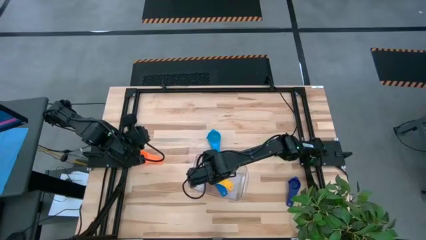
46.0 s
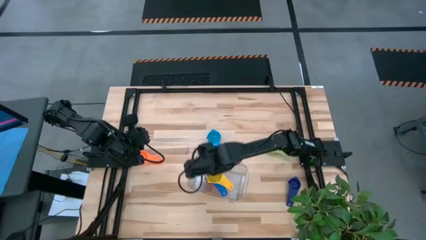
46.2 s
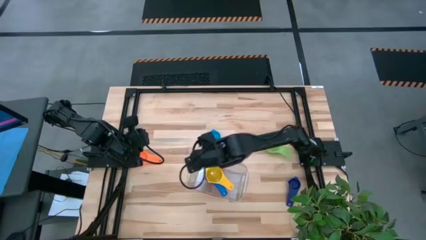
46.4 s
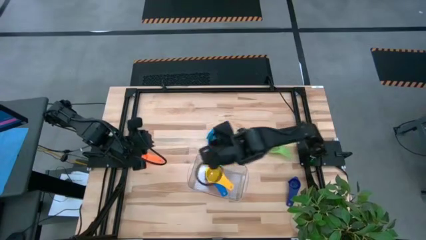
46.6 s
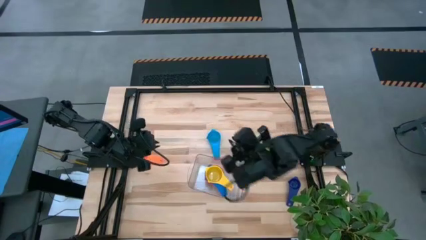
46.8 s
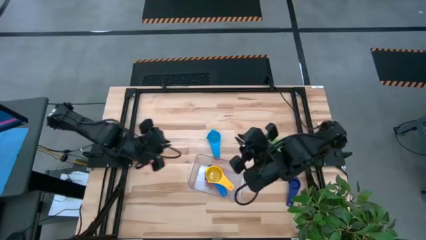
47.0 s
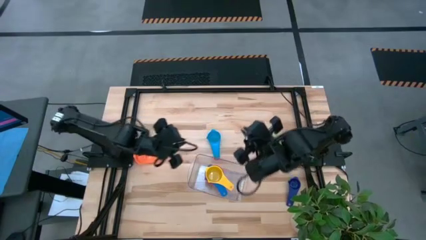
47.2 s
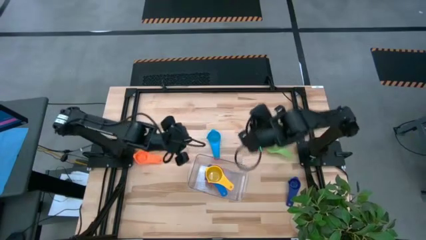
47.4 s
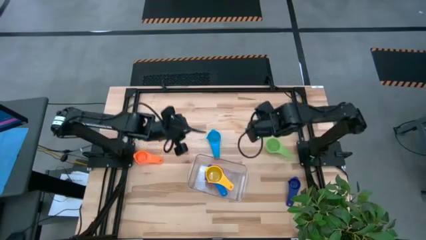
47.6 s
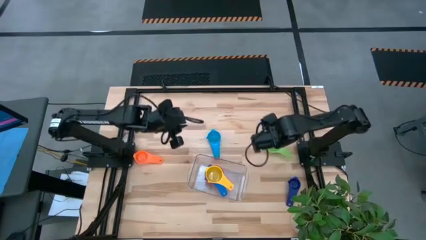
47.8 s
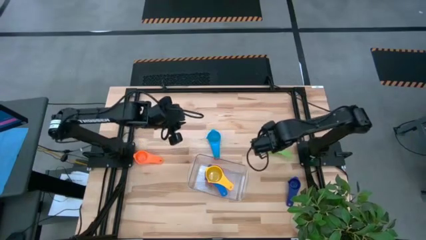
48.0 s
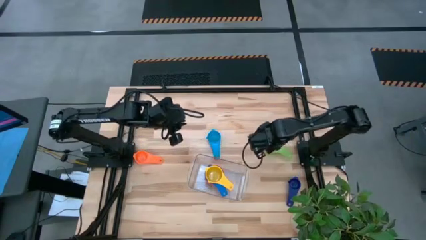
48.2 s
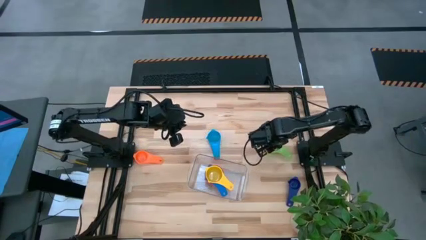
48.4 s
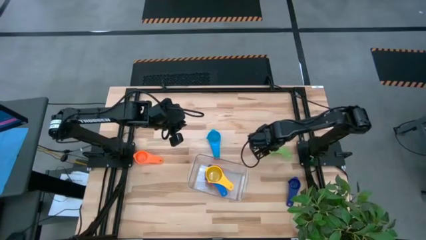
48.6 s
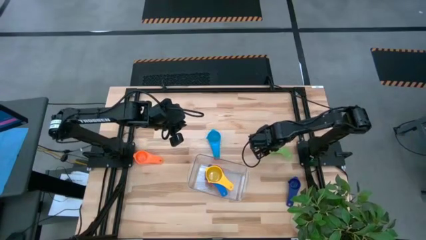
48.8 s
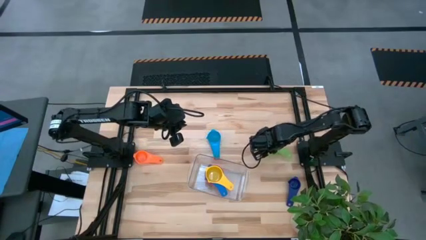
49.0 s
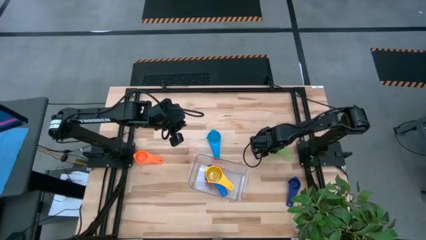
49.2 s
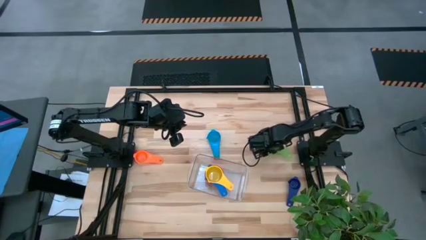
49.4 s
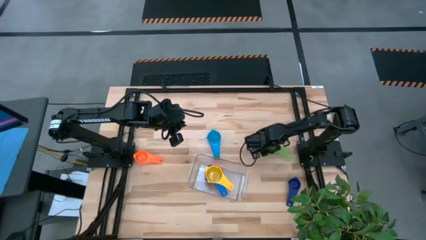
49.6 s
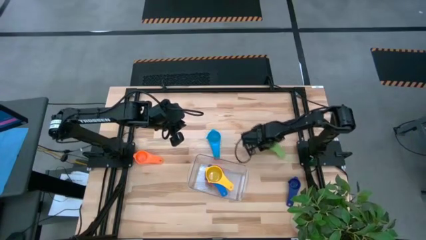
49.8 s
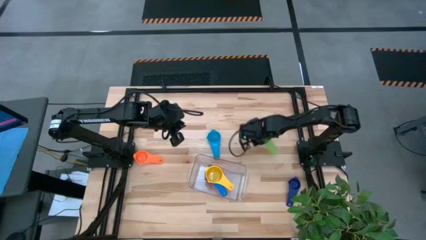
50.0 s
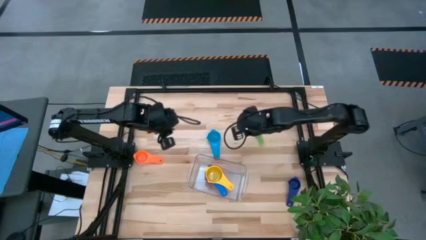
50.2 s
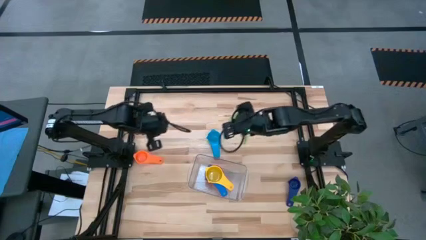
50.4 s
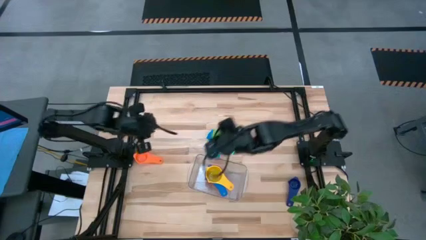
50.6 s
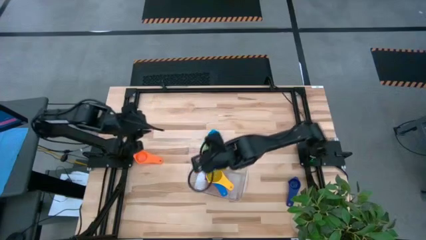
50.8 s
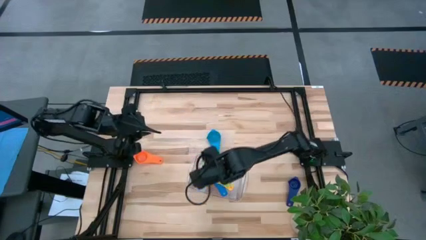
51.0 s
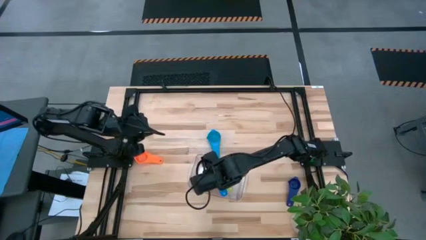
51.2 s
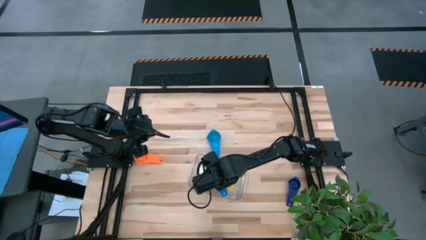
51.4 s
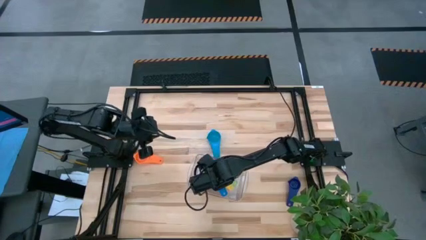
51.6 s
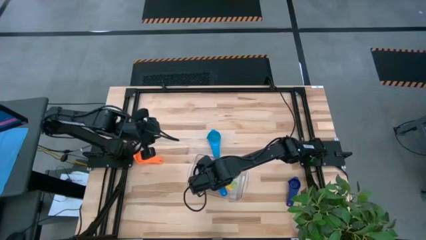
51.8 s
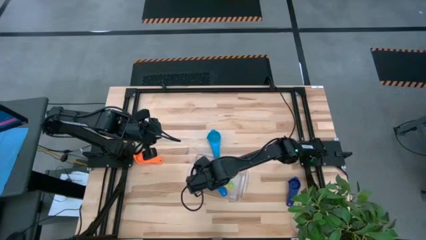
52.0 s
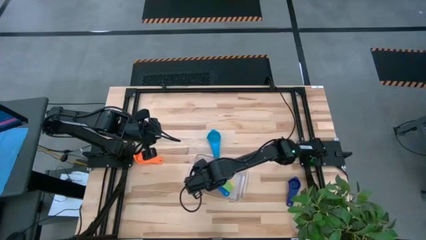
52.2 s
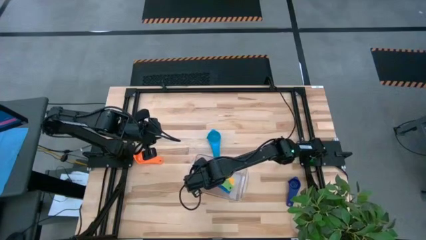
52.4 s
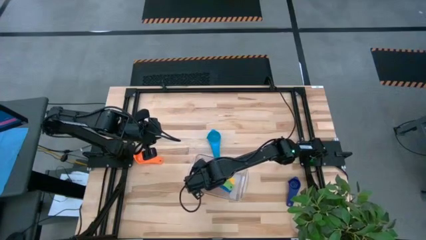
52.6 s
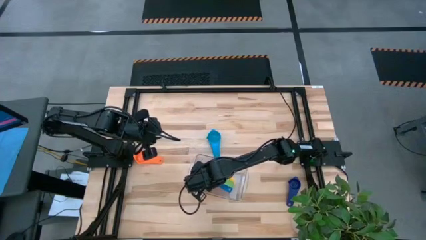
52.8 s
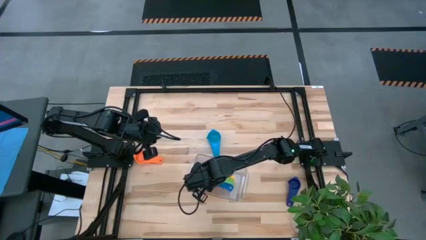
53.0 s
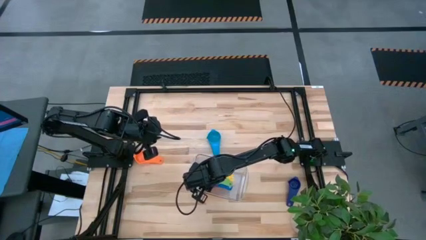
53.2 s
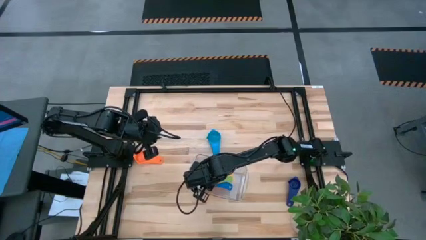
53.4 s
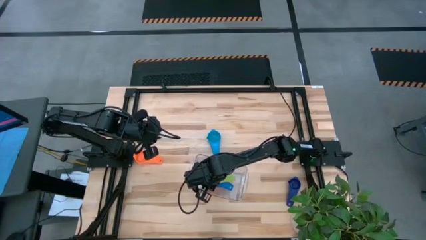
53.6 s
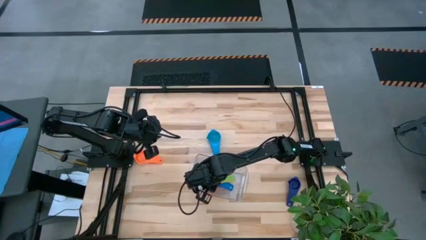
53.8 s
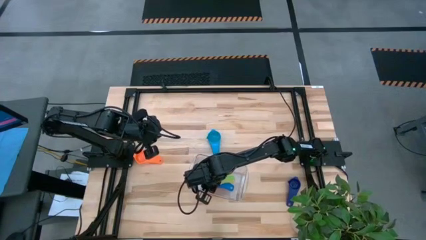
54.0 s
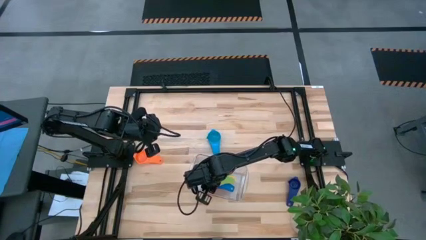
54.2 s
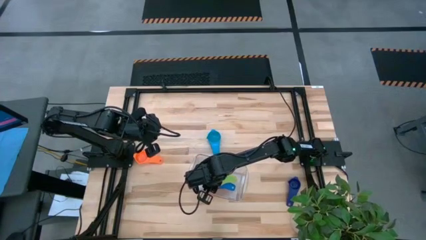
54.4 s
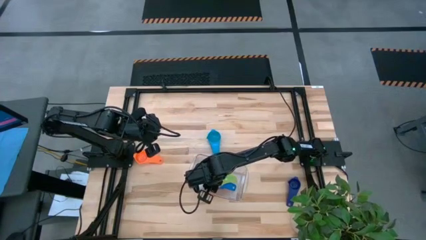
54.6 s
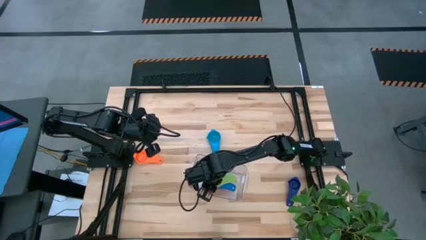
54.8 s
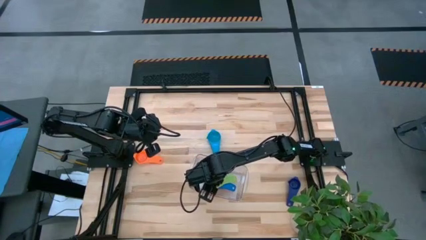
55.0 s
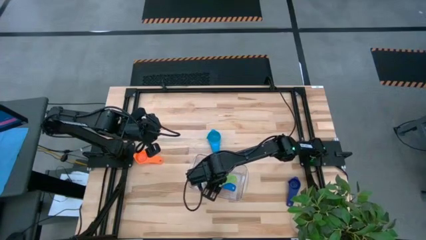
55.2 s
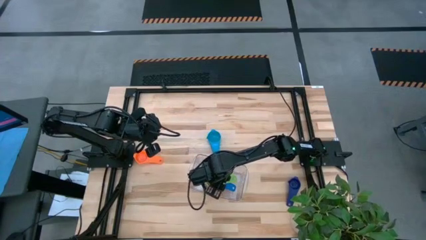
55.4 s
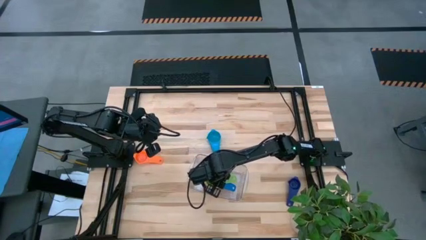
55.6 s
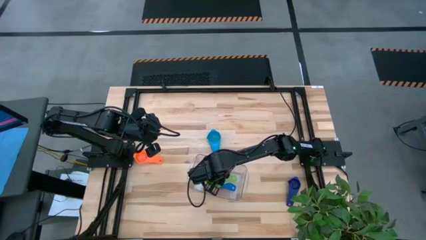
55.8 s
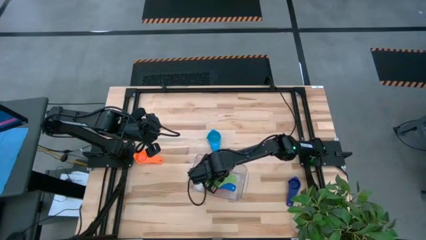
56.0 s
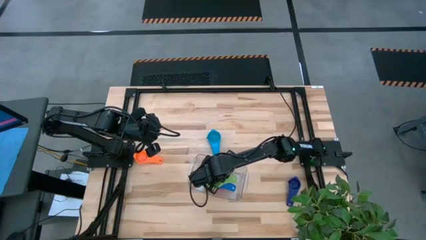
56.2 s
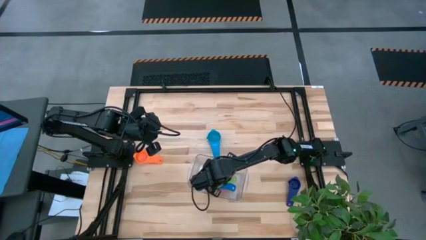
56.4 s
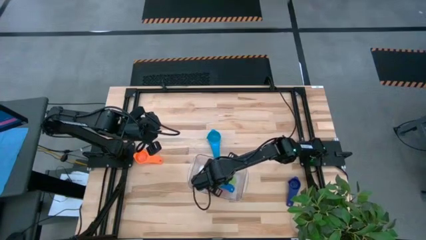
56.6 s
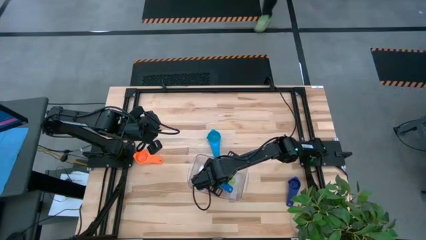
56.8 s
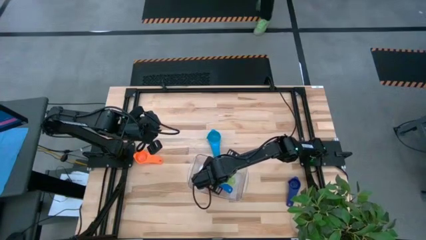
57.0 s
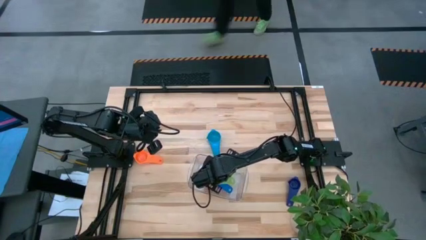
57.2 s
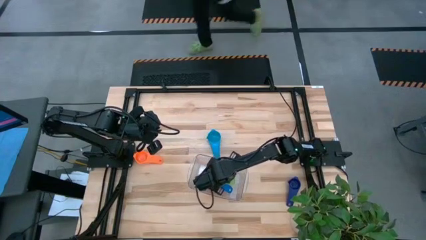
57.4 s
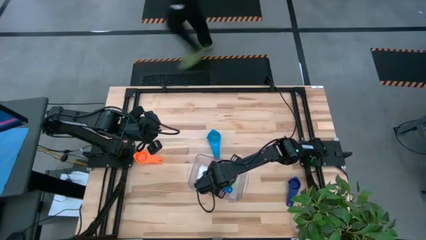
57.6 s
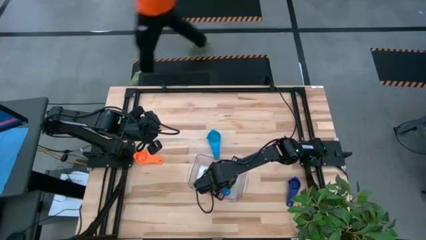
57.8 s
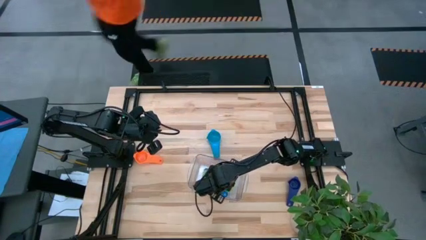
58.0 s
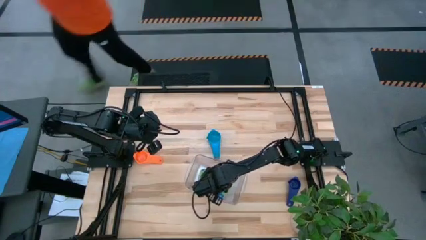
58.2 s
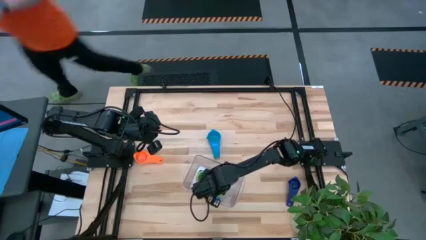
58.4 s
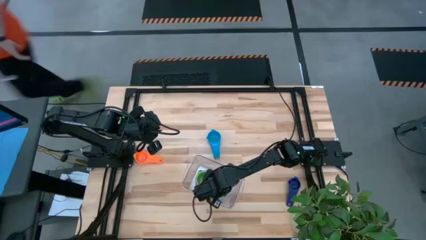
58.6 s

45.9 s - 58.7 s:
Task: Nest measuring cups in basket
Stack the green measuring cup on top of the yellow measuring cup into the transparent bin

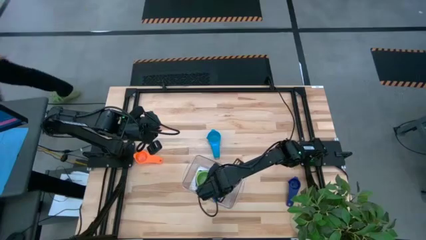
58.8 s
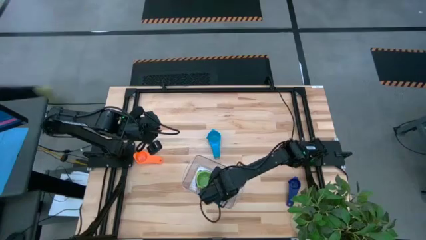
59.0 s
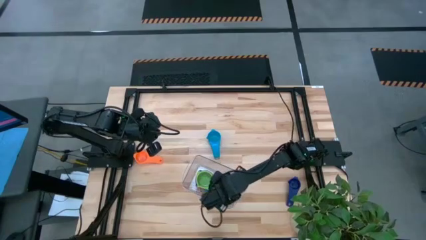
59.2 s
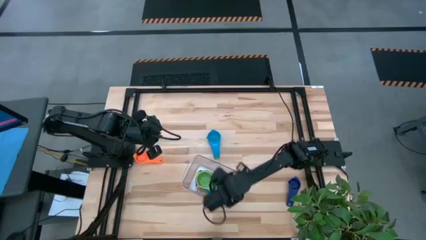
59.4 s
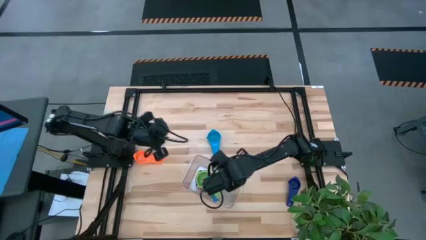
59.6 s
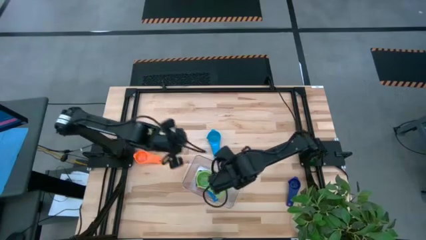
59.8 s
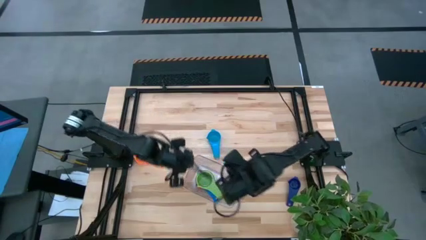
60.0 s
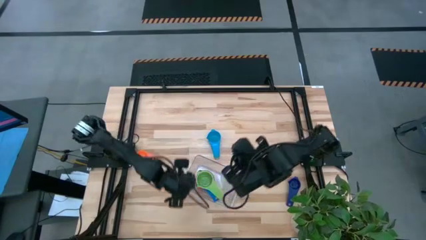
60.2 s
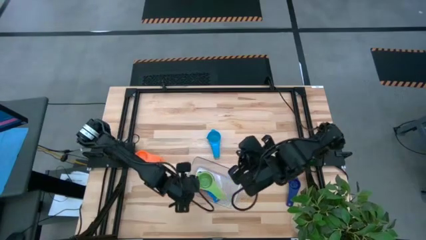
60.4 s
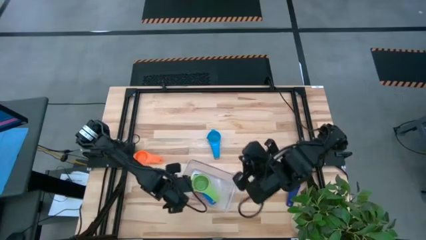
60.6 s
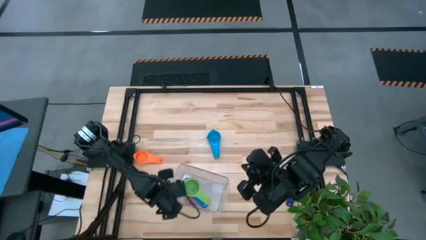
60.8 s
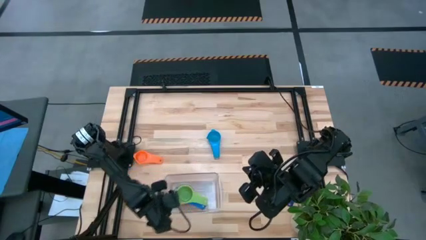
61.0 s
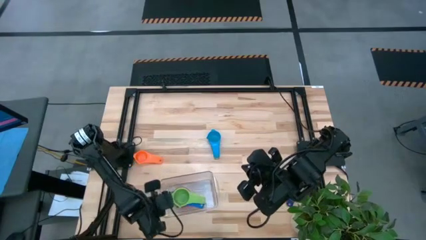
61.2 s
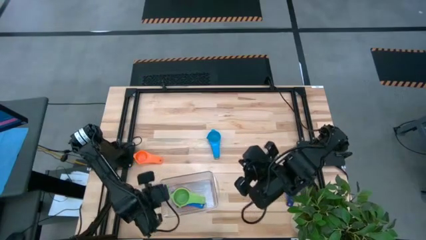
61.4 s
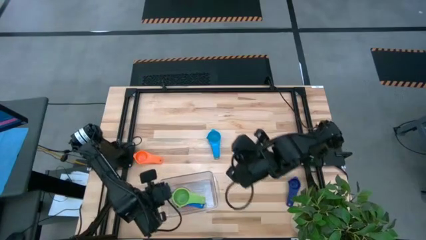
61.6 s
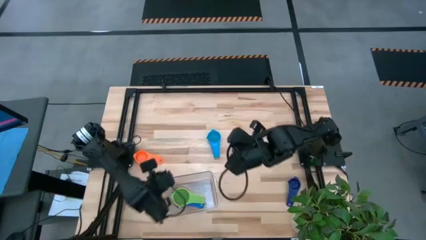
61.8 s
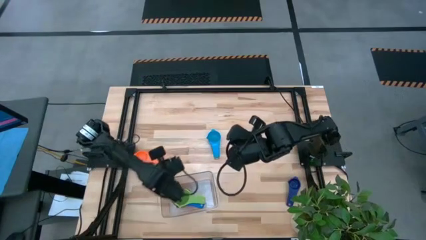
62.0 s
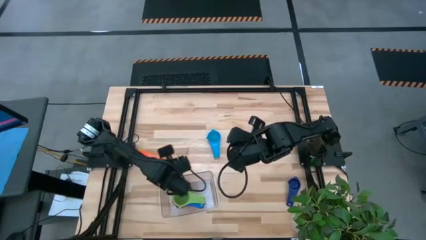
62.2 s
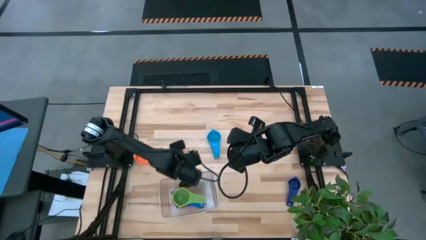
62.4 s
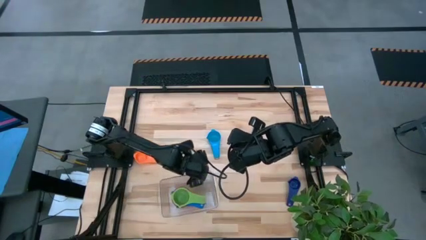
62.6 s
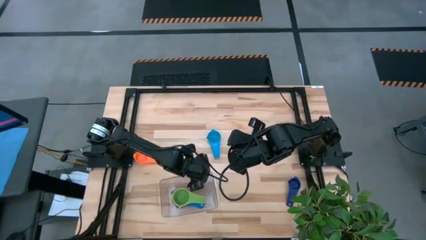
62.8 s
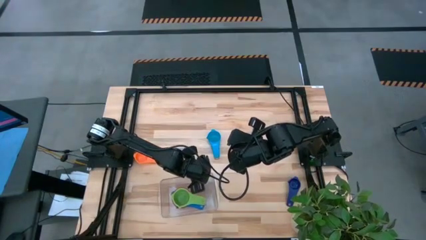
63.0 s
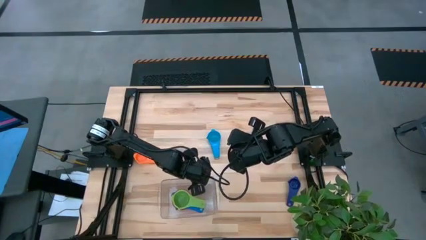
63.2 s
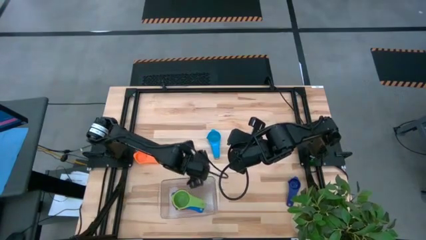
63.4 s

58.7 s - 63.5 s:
Adjust the transparent bin

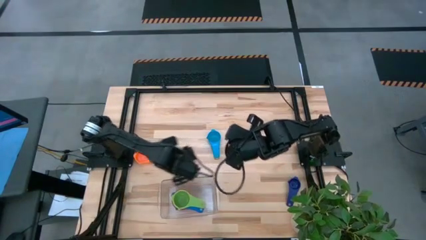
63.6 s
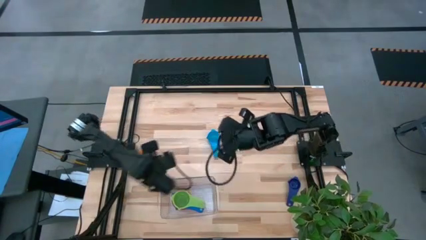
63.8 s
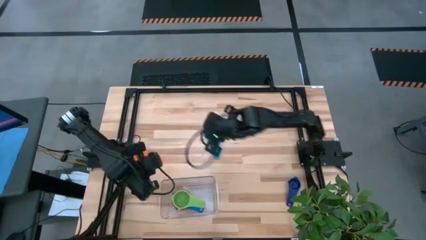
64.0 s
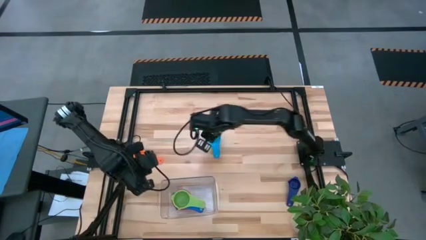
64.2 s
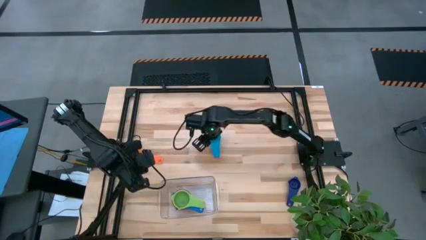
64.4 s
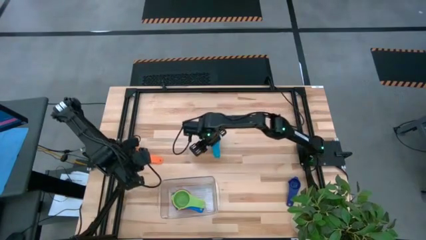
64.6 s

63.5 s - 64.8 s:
Stack the light blue measuring cup on top of the green measuring cup into the transparent bin
